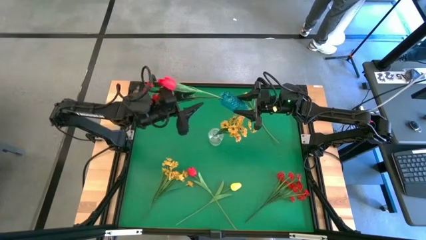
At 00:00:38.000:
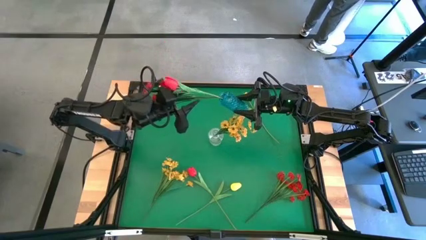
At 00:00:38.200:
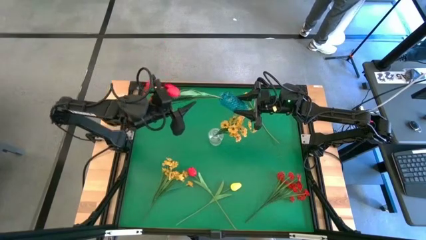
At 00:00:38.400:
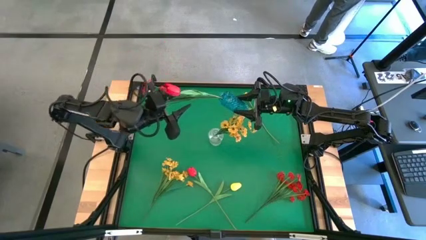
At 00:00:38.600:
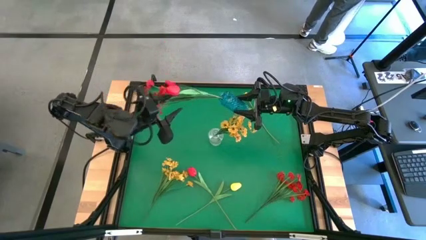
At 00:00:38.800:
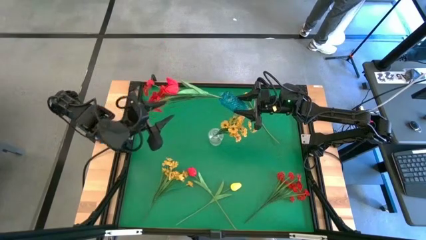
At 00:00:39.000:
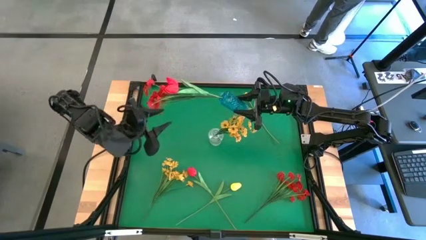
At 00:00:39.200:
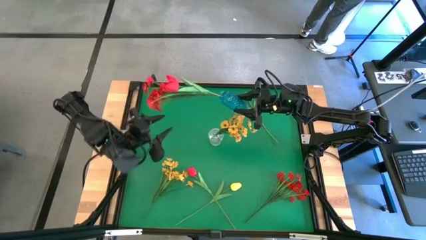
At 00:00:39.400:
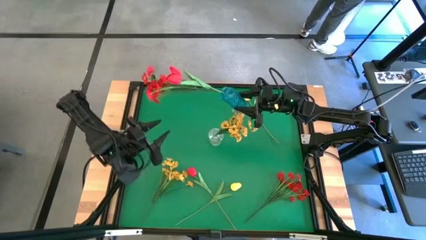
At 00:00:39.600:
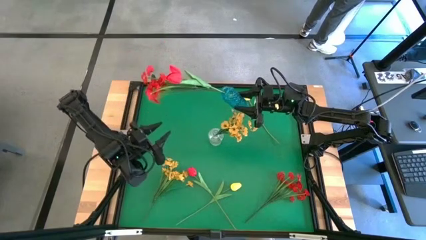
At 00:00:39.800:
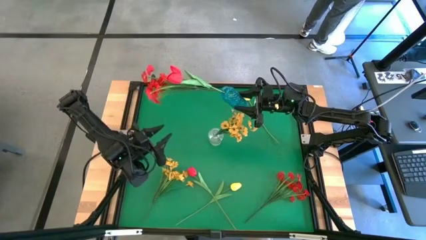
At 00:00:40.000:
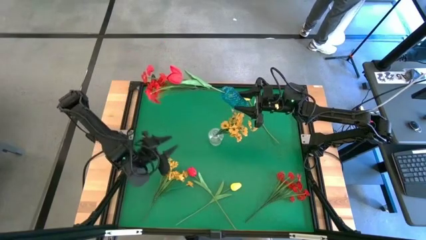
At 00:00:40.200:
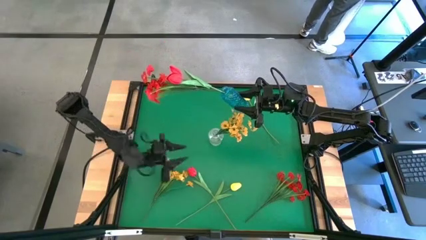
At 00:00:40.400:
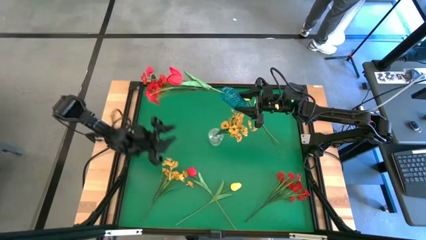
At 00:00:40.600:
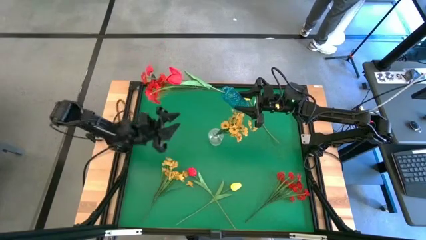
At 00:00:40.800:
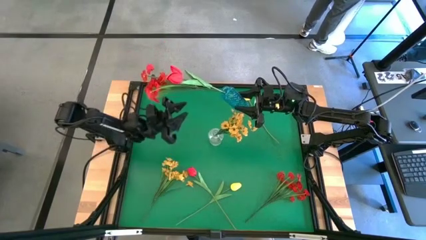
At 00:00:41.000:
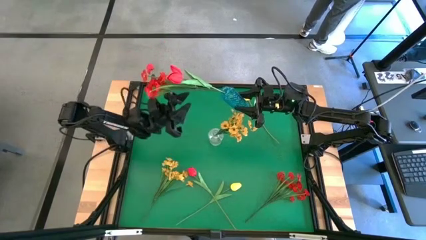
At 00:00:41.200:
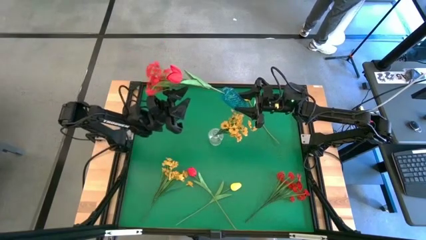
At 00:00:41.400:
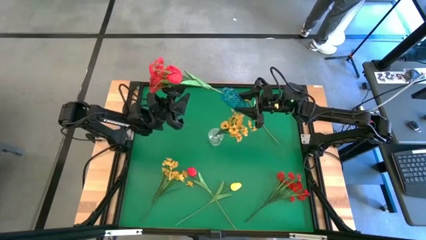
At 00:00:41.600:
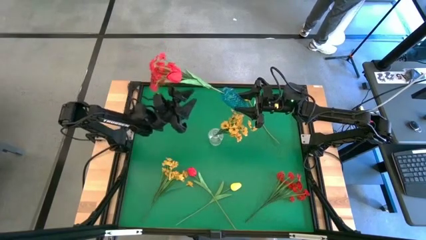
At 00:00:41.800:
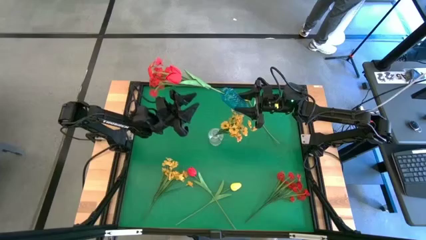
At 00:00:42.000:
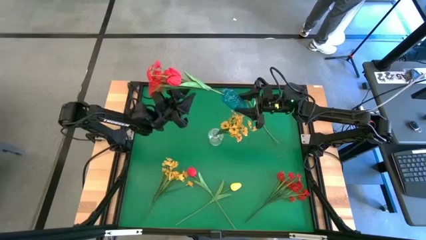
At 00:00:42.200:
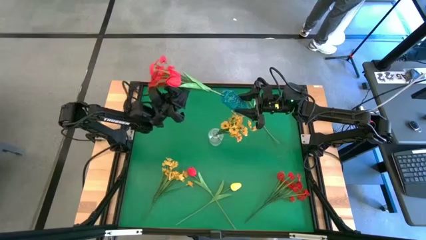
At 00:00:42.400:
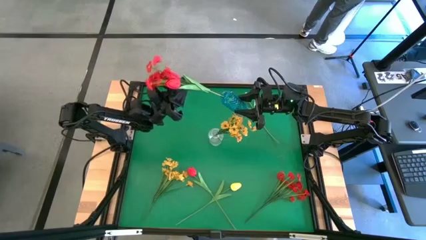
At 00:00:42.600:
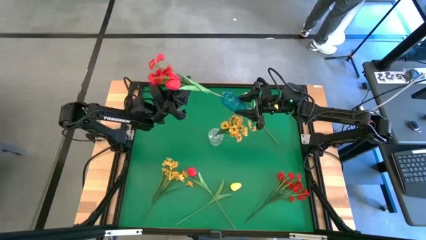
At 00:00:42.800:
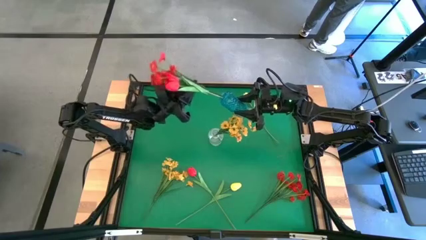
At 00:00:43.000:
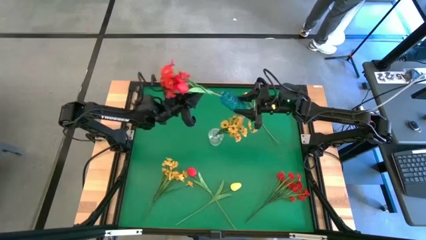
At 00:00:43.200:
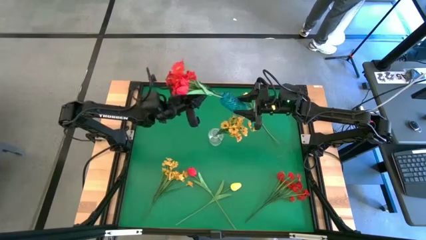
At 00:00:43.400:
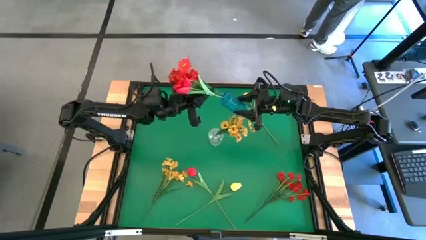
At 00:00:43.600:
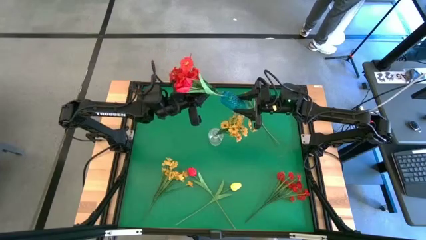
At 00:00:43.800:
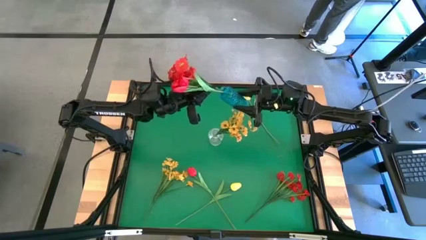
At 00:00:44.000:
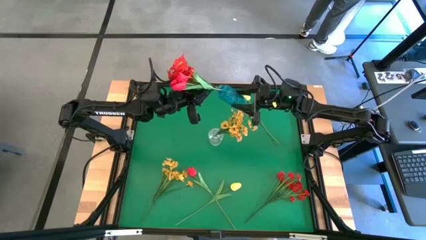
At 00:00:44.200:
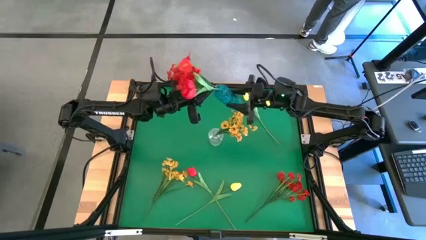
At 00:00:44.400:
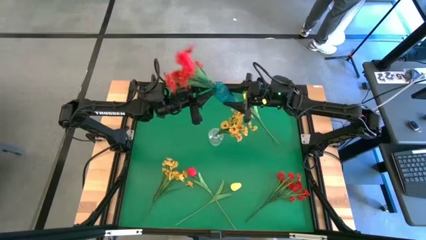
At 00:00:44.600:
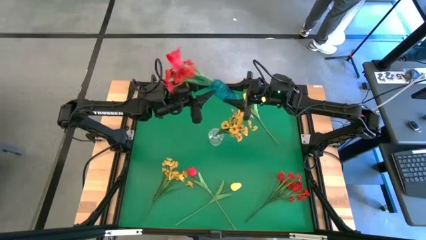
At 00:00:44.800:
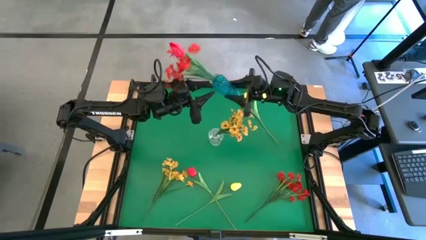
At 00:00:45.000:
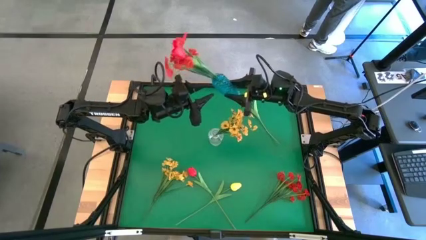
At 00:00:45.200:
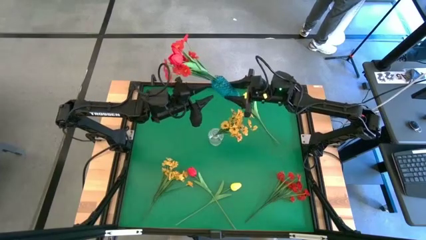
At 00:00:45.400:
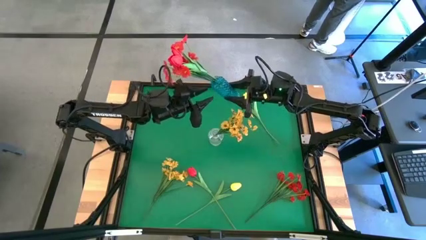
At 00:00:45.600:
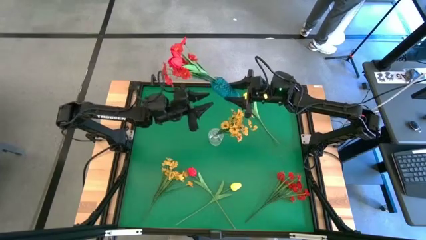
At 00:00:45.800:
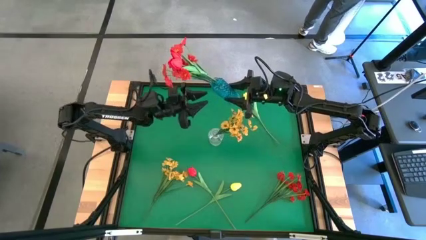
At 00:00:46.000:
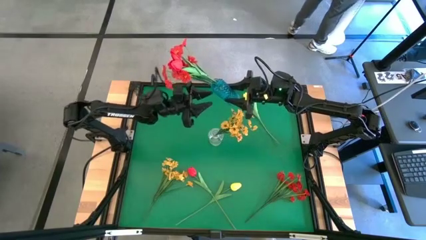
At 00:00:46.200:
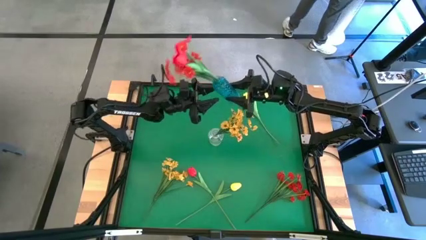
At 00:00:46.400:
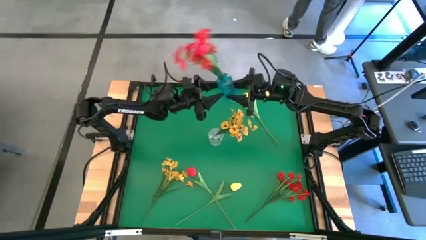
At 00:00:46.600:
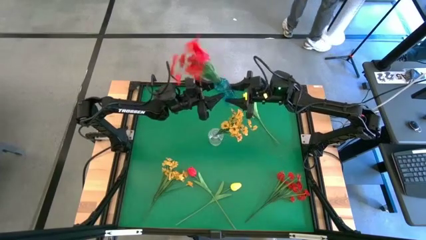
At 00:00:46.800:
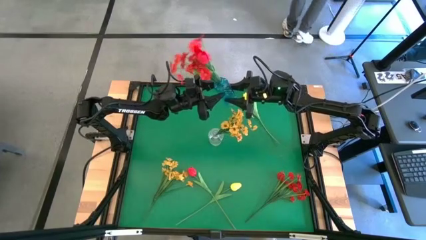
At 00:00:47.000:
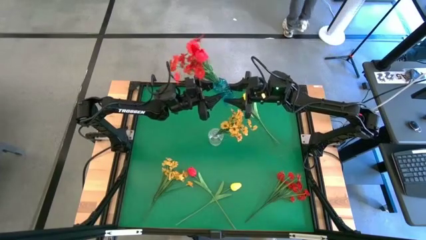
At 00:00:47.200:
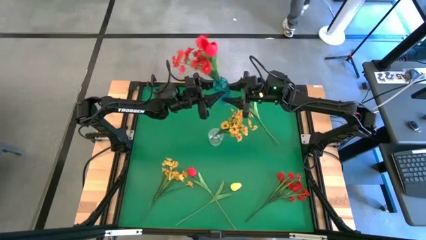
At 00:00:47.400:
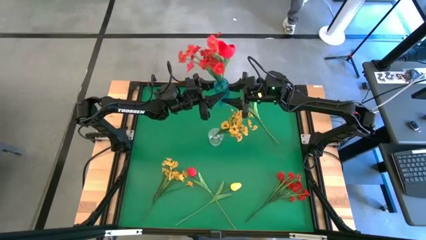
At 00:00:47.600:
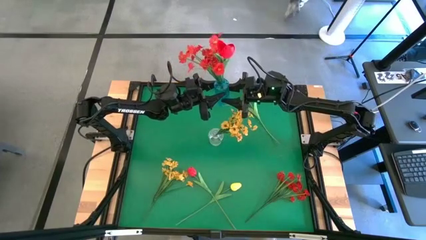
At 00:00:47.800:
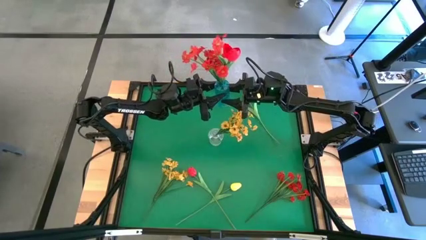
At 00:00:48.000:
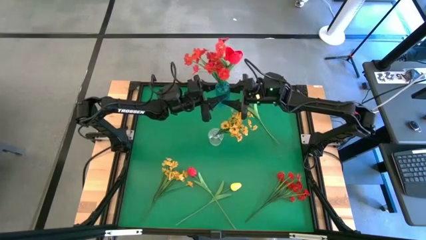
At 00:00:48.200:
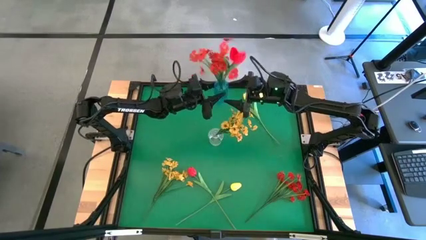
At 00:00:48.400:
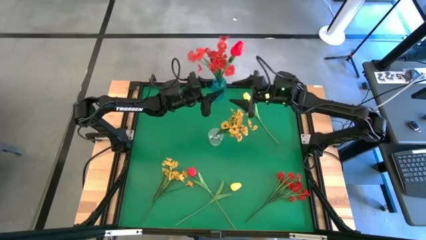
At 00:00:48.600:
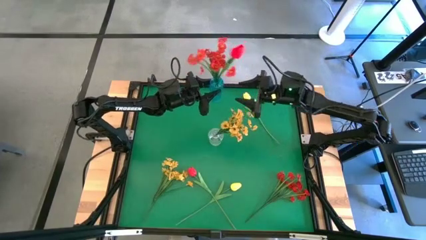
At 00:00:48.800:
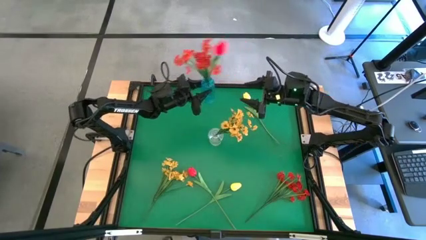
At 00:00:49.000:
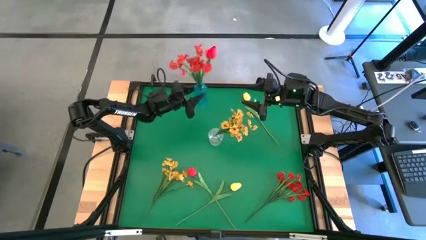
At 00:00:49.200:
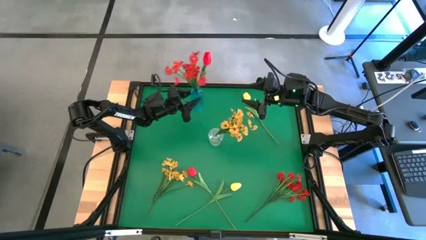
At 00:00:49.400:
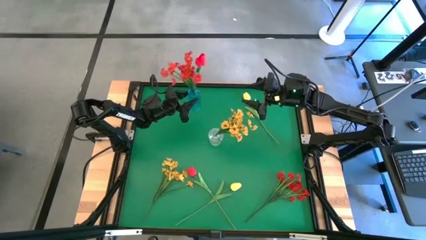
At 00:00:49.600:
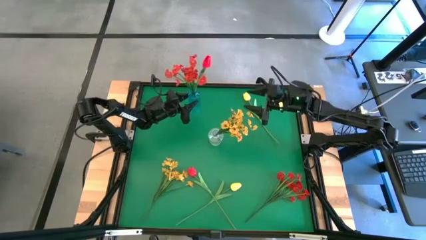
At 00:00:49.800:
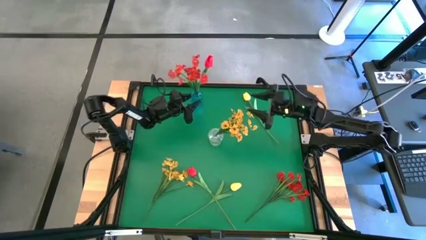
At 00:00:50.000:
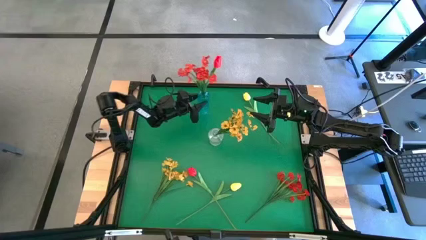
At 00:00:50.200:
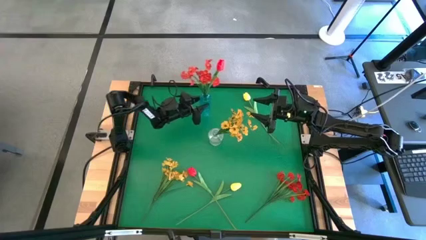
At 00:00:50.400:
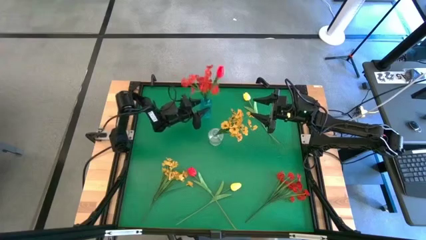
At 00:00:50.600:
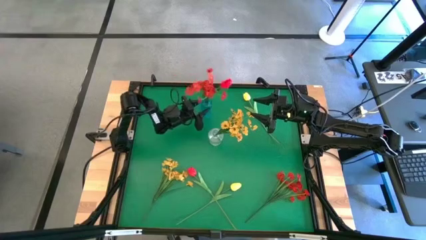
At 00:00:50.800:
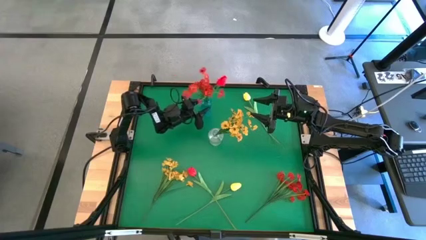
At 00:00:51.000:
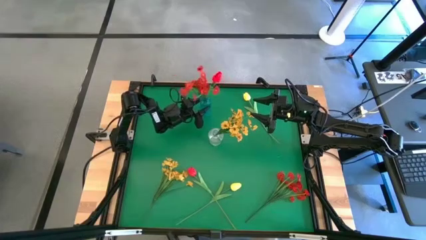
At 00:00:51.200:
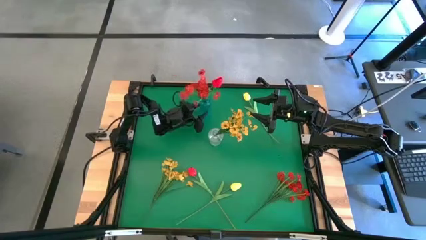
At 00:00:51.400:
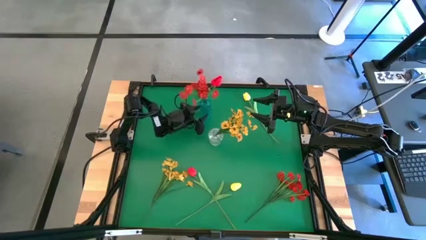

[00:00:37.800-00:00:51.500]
Task: Sort flowers into vase by color
Adjust the flowers in the blue vase
